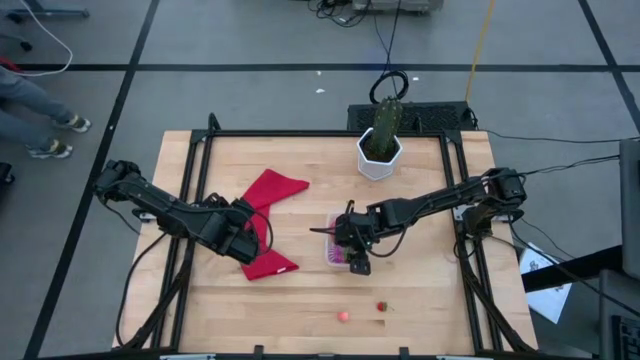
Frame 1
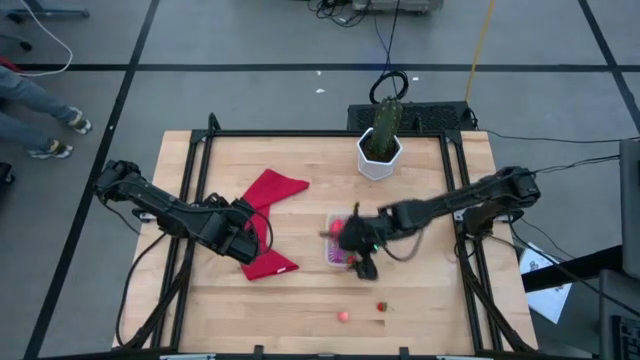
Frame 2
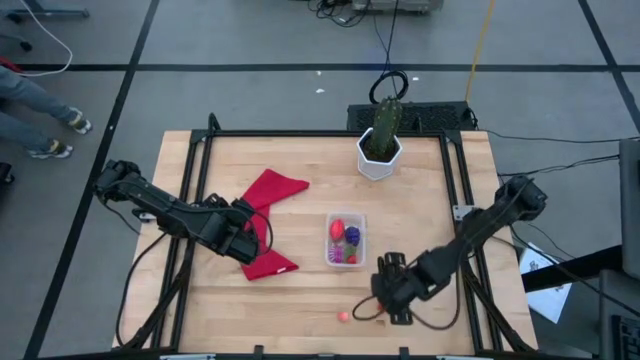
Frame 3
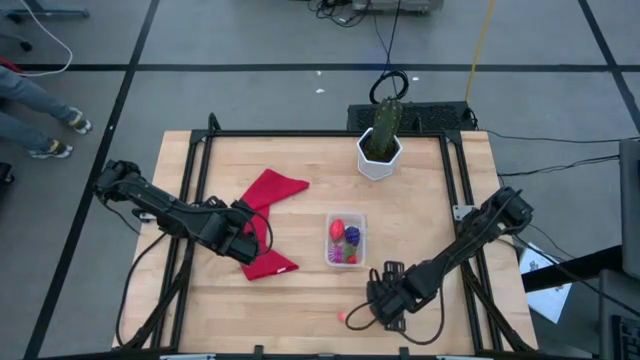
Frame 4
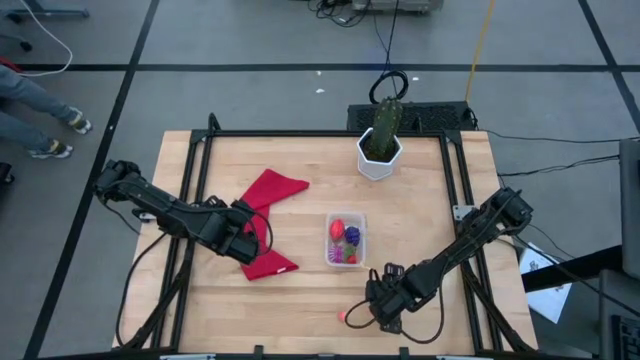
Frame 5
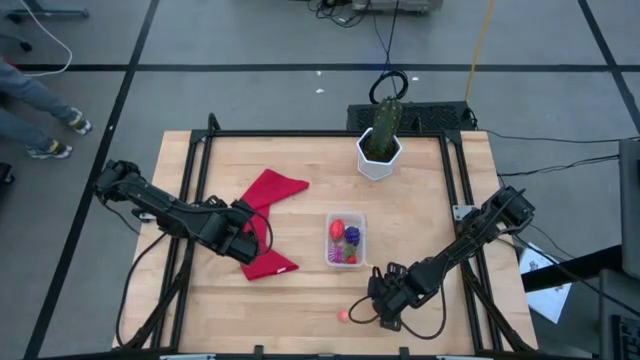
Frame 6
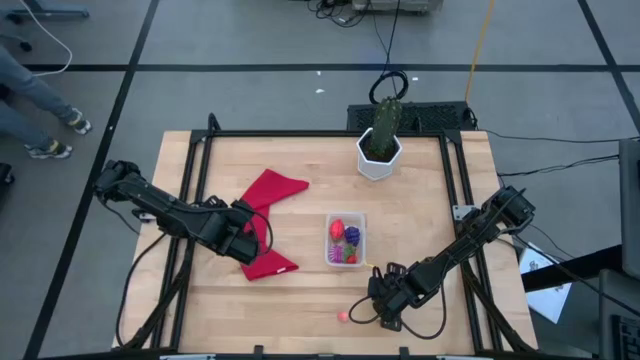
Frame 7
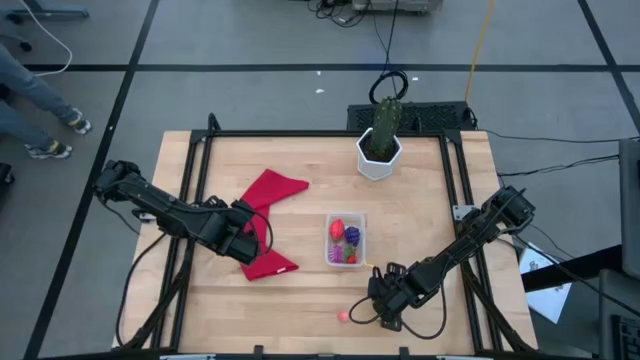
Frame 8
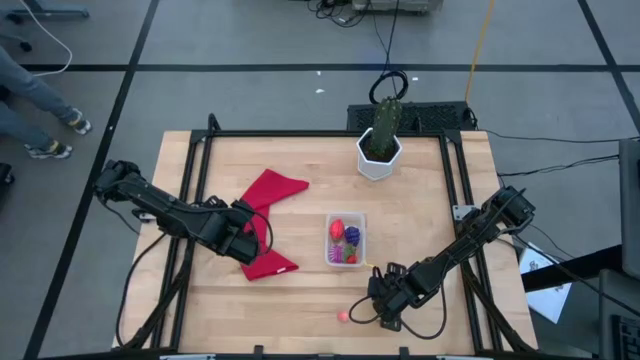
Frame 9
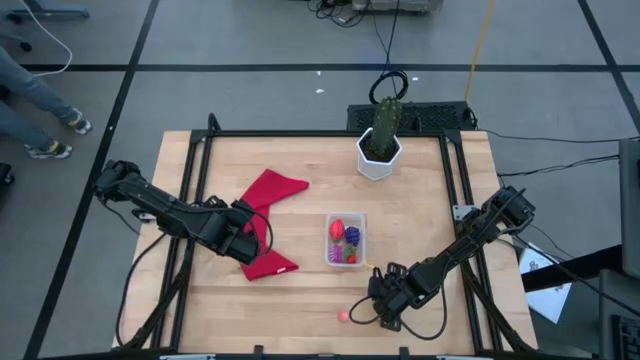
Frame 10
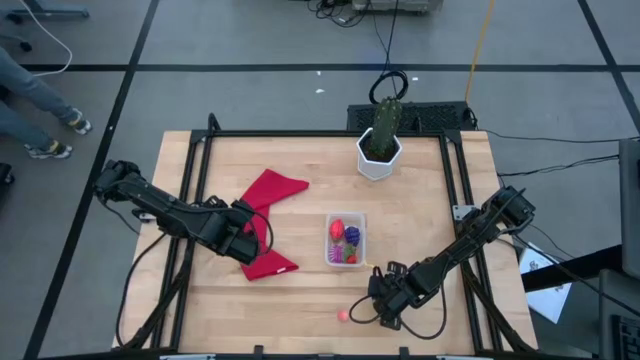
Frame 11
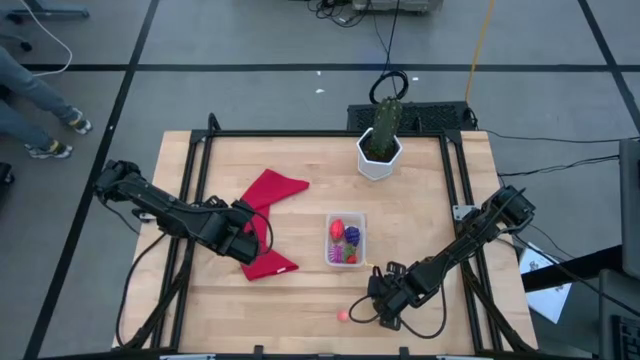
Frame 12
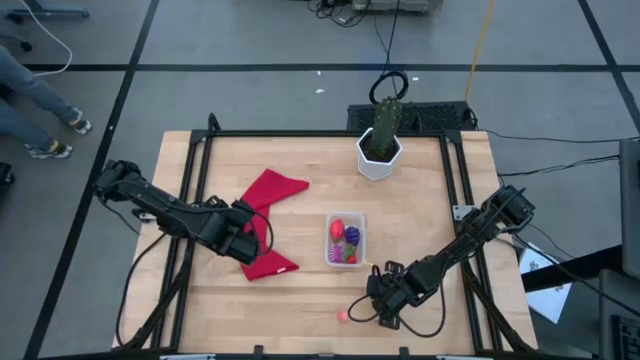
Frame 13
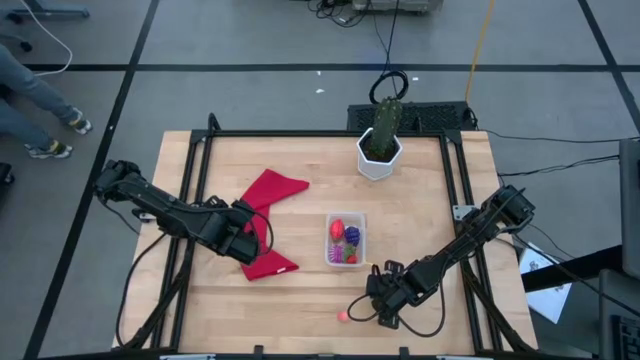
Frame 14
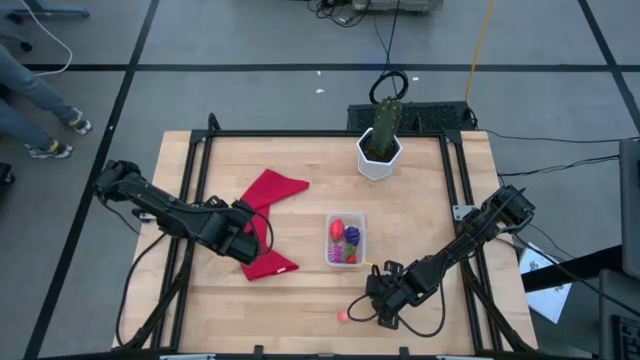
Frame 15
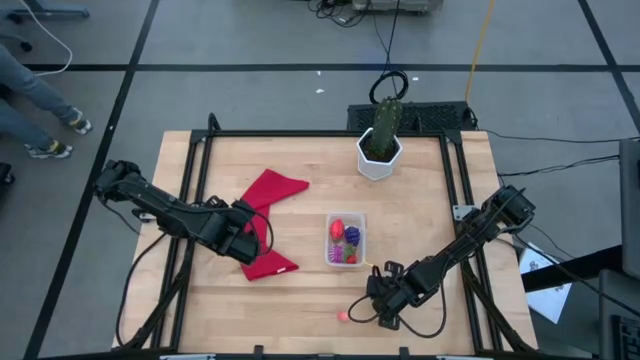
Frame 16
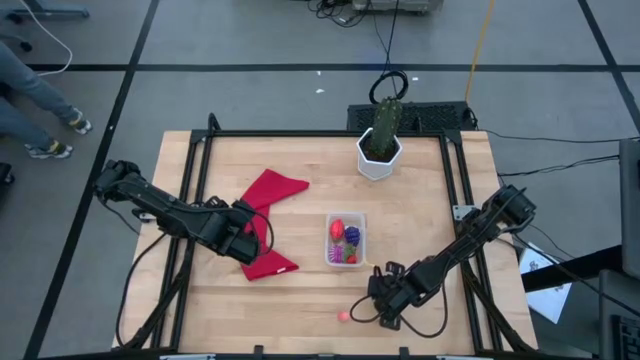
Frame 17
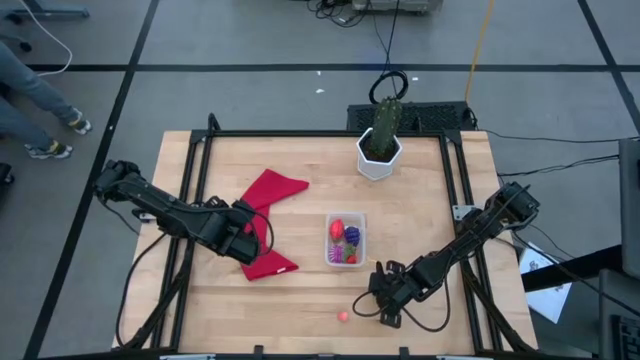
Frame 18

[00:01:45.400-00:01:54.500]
Task: Pick and placing Produce into tupperware
Put the red strawberry into the transparent bin

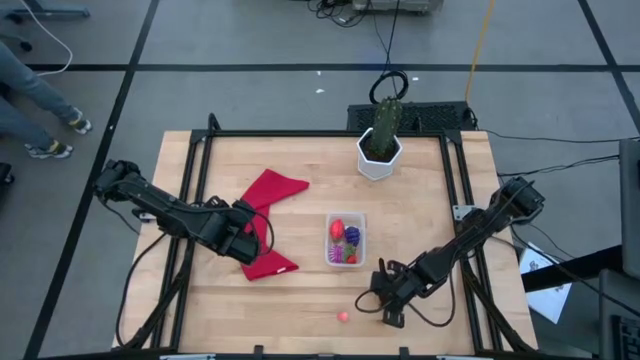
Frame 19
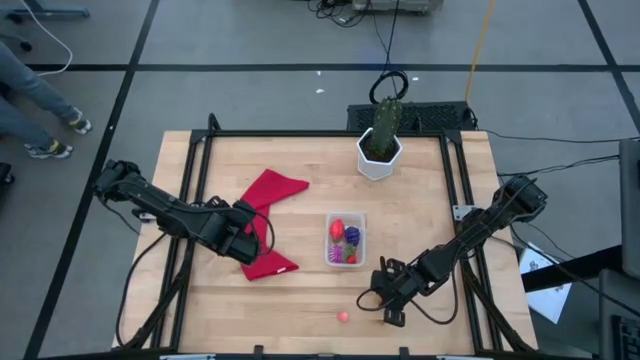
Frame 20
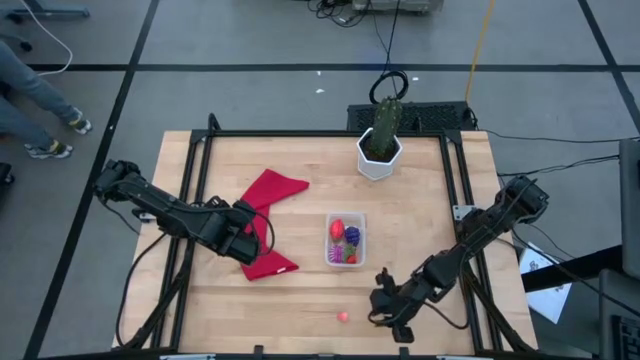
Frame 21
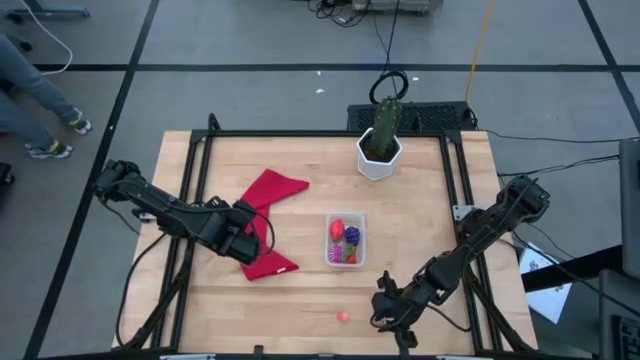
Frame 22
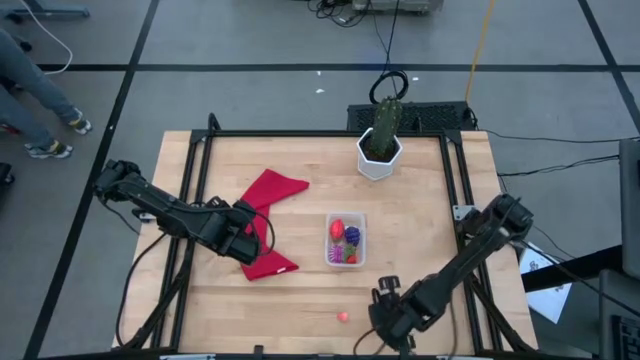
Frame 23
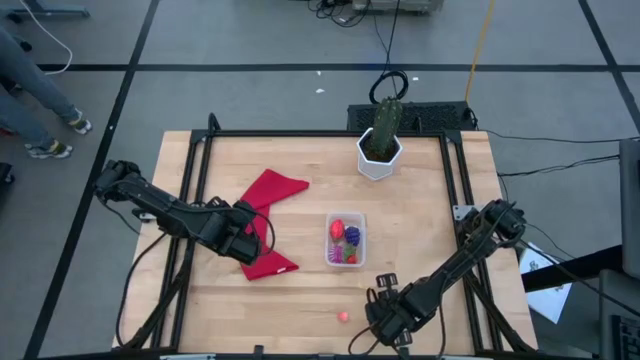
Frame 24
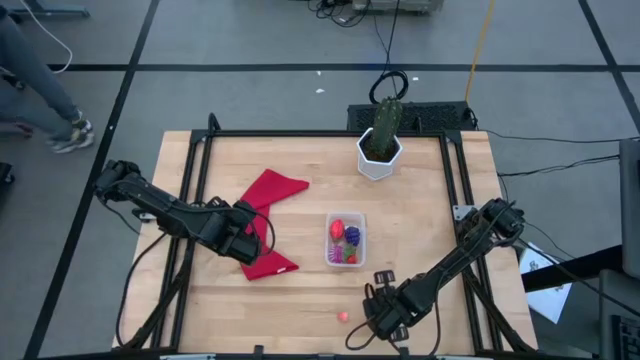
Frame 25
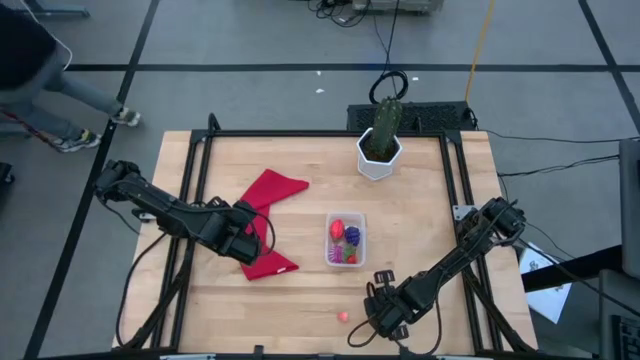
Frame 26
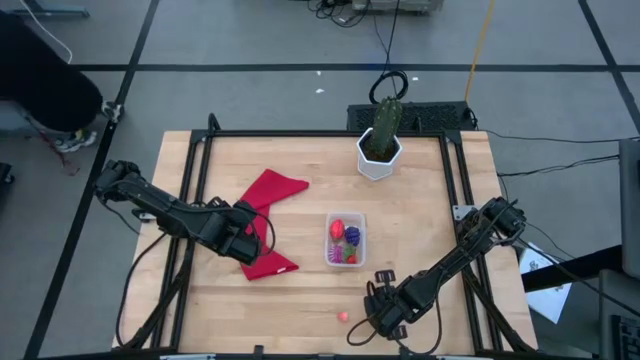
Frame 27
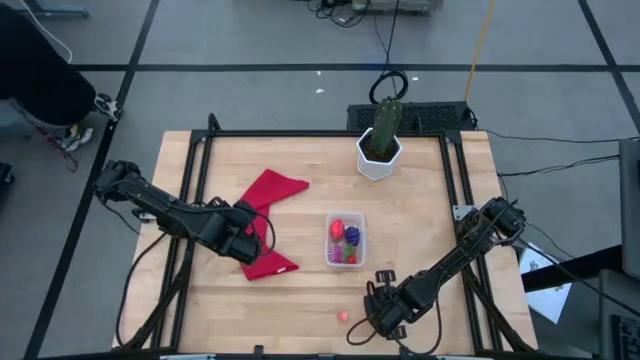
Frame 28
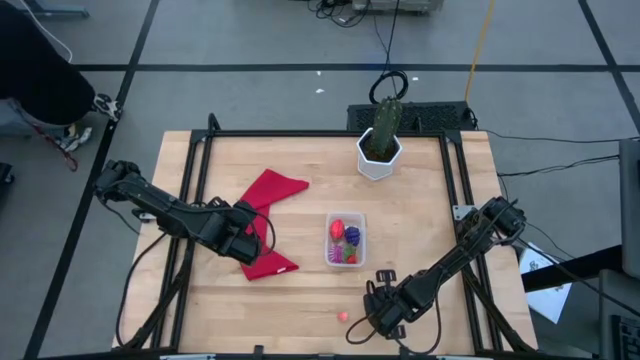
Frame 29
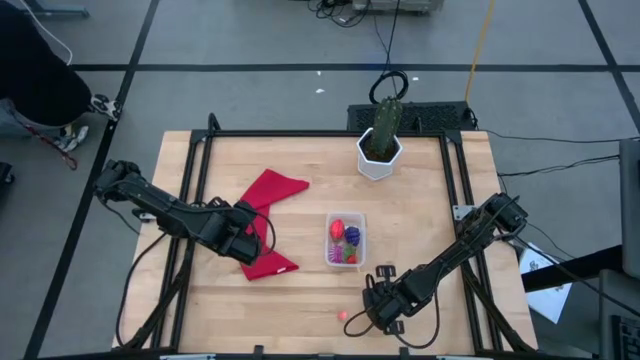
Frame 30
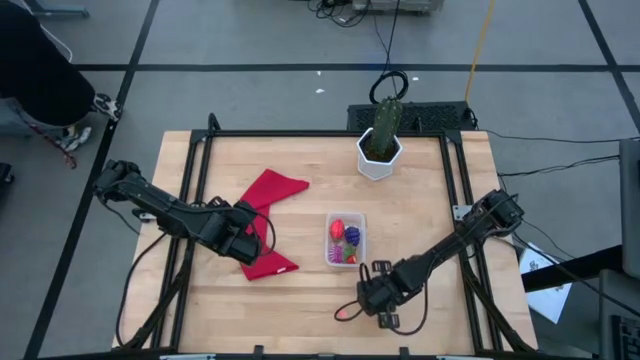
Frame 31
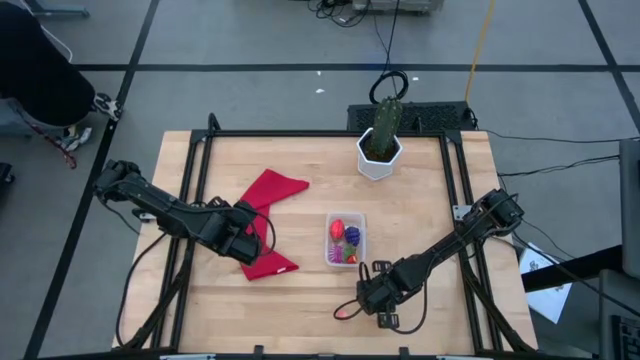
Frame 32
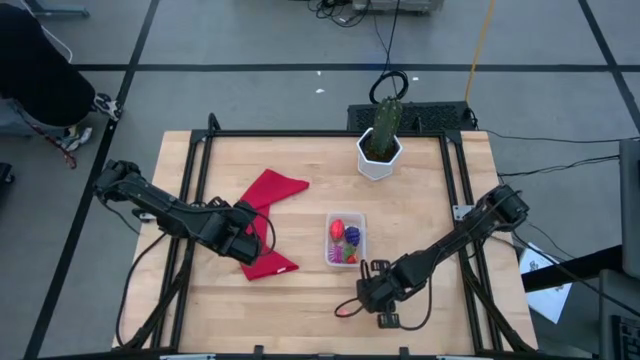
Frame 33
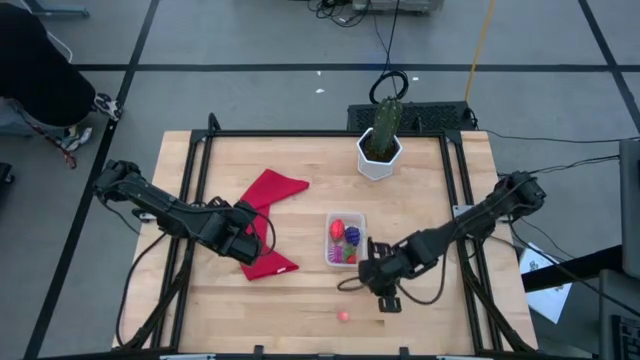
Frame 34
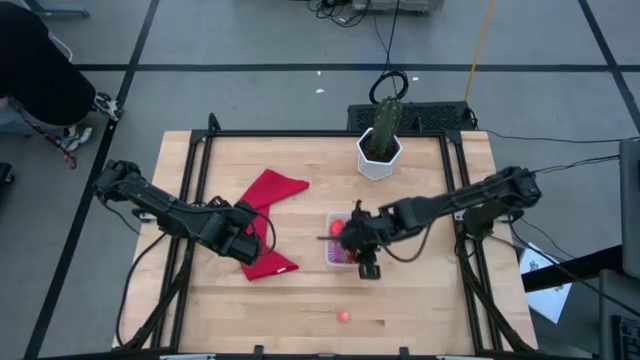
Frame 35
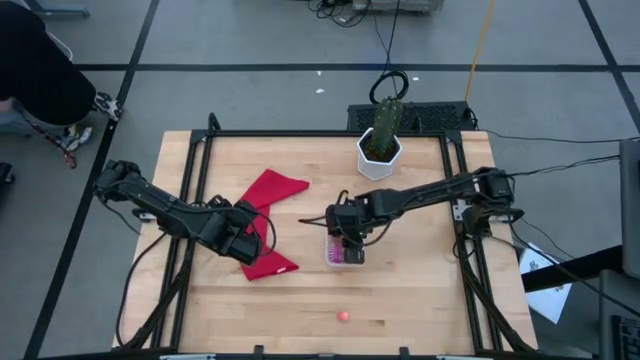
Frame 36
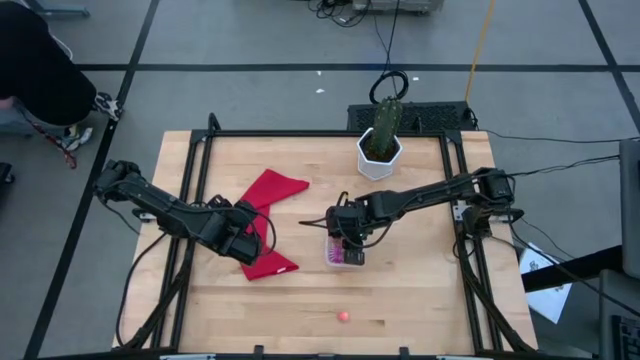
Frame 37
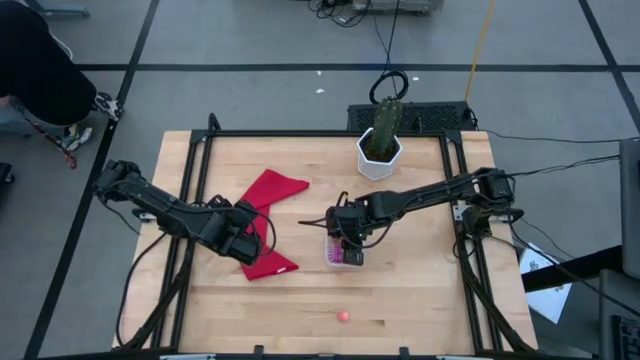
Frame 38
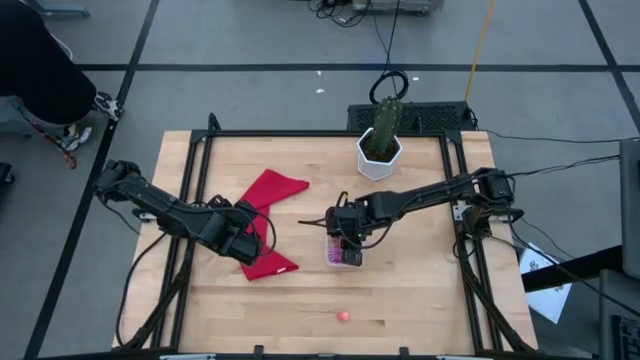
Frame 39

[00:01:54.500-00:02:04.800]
Put the red strawberry into the transparent bin
